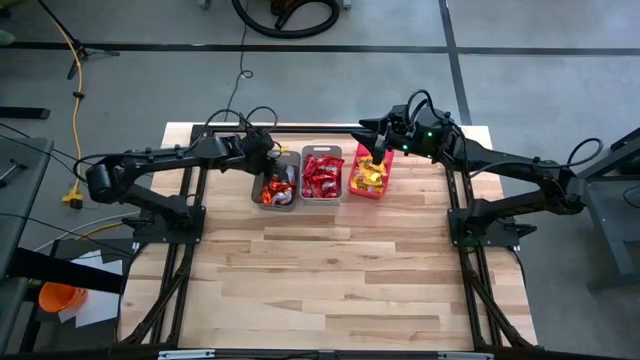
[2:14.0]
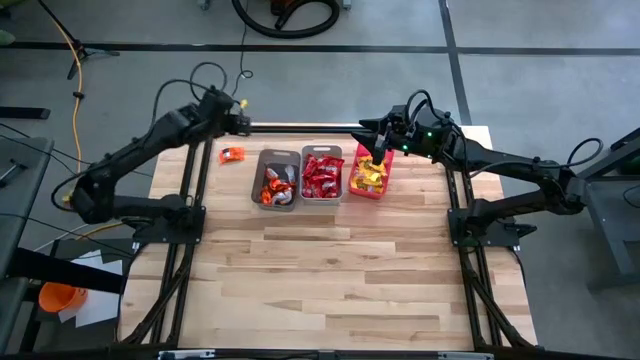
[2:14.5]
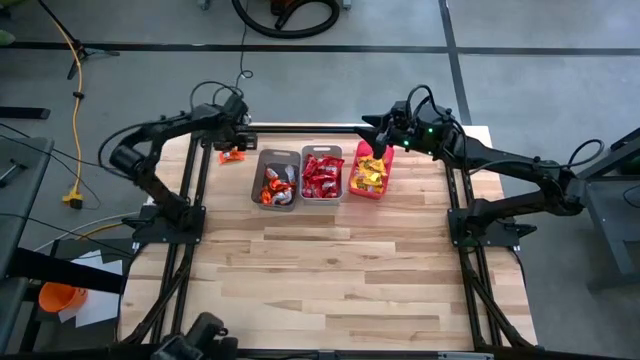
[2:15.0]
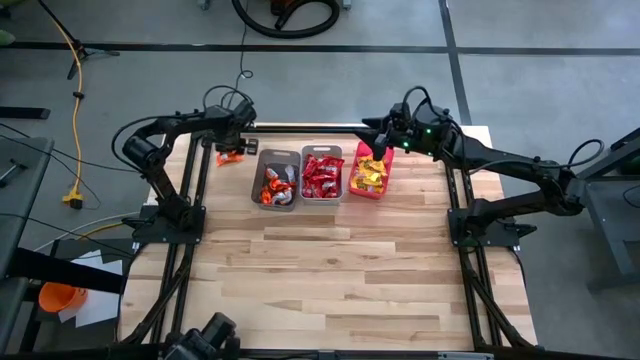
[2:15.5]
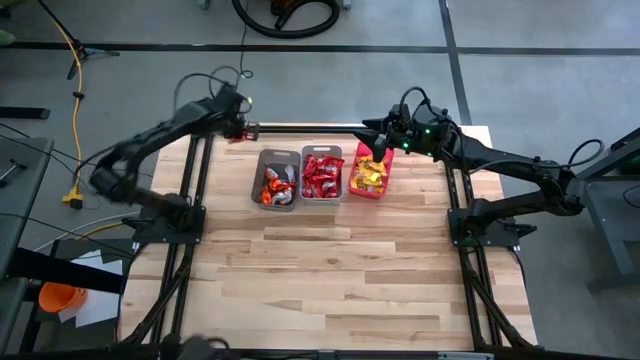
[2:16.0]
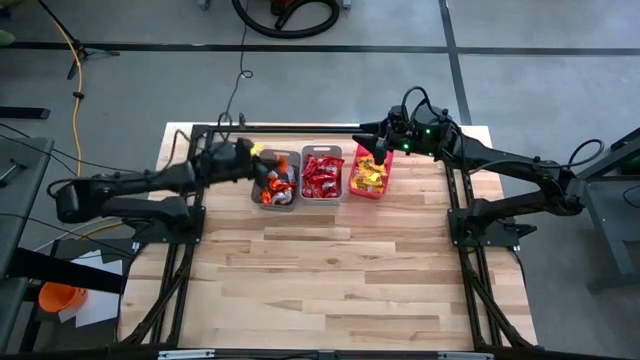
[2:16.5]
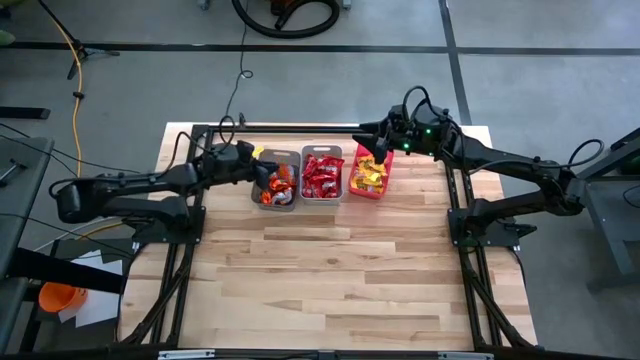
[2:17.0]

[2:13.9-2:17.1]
Task: Sort candy
Put the orange candy into the black bin

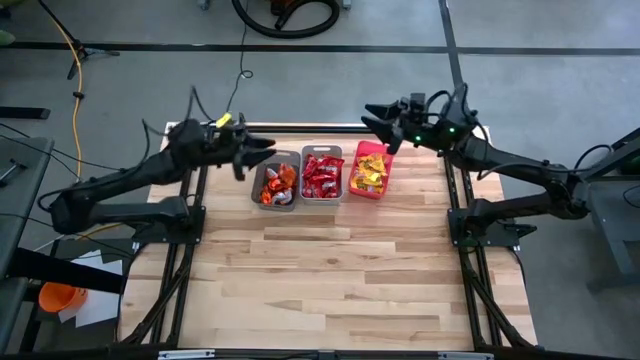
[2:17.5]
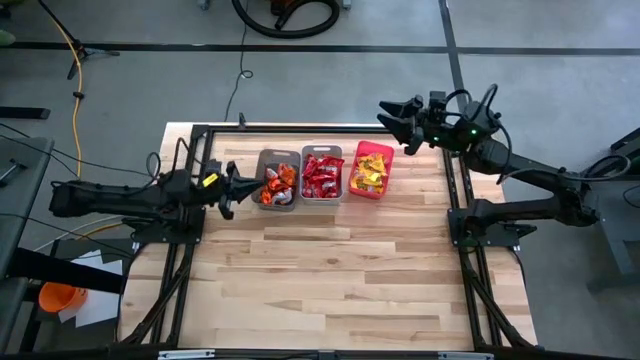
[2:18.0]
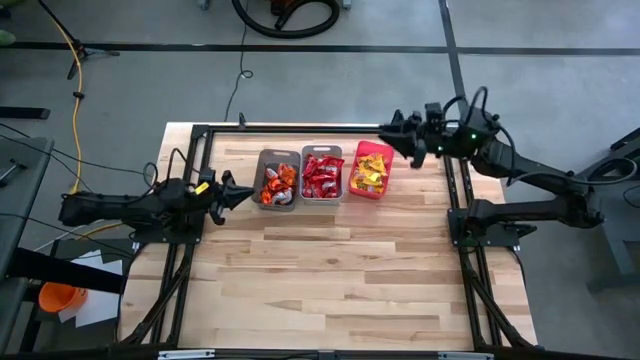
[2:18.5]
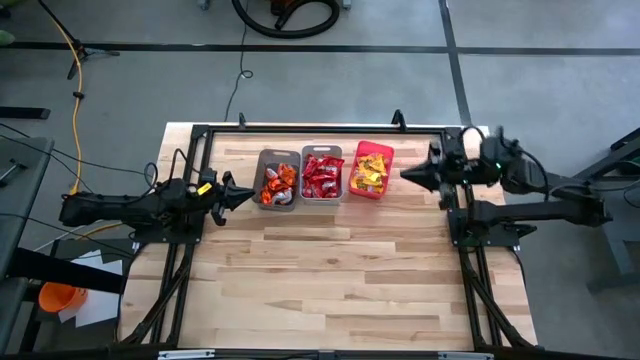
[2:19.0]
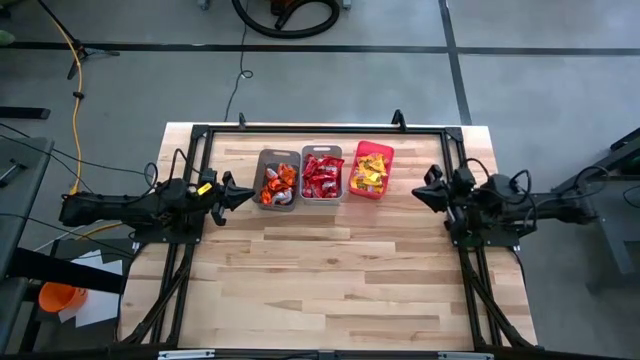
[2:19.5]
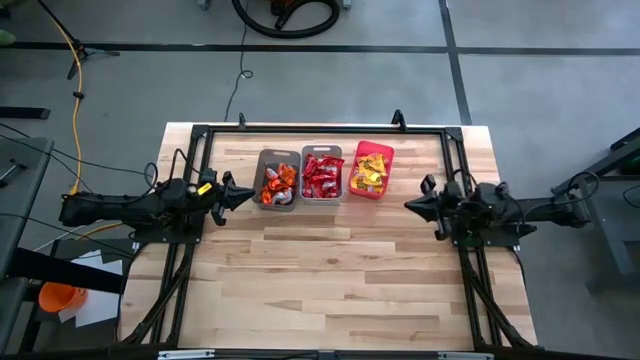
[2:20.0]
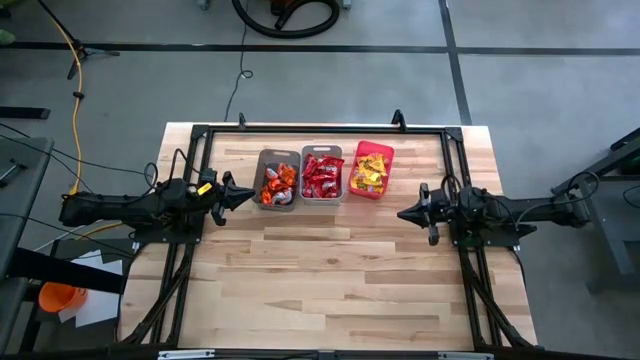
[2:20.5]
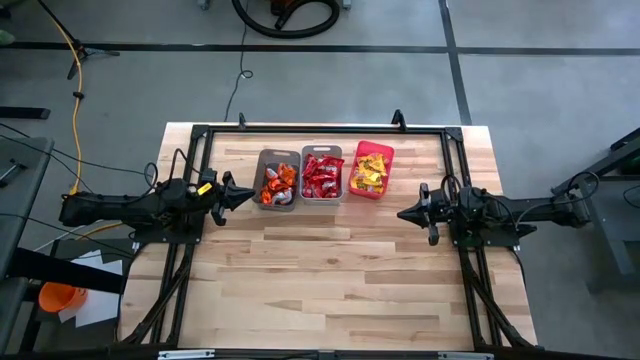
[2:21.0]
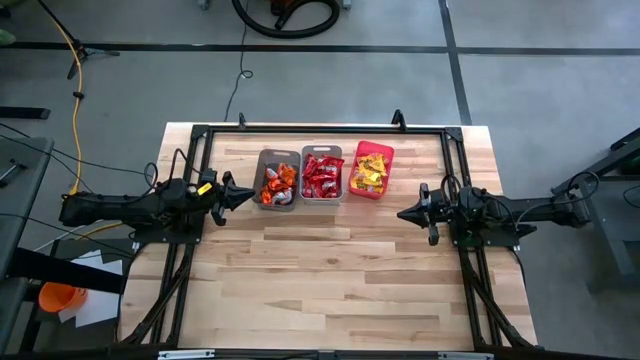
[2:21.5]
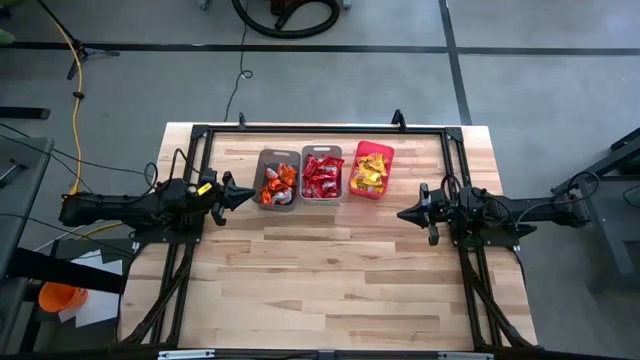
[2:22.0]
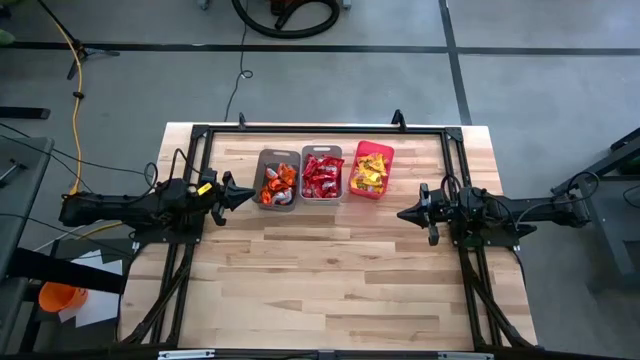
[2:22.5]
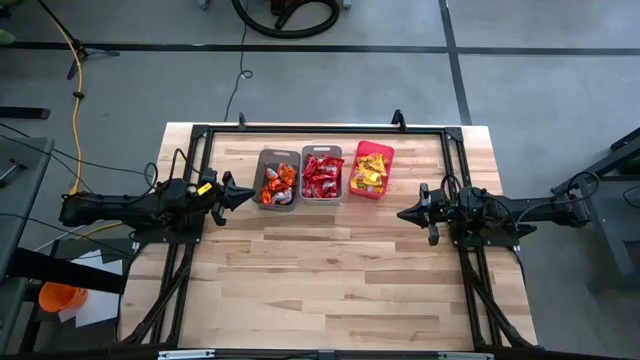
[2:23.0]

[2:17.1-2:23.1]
Return to Home Position

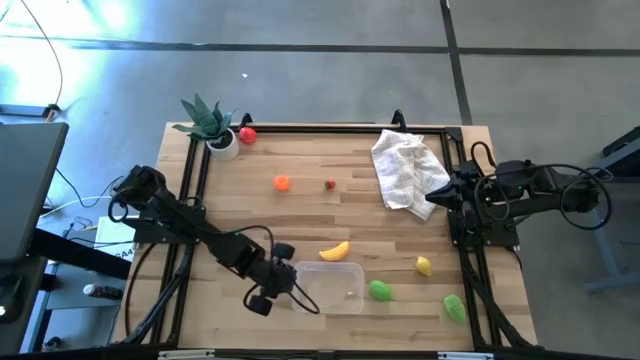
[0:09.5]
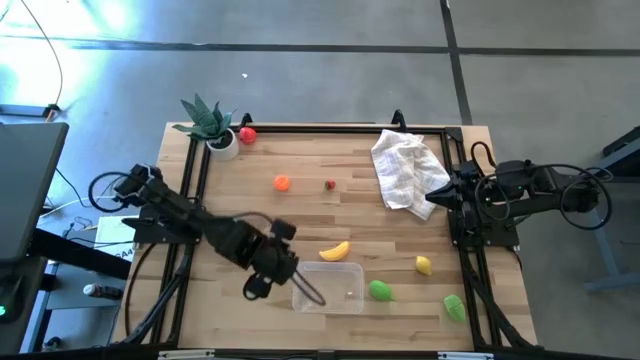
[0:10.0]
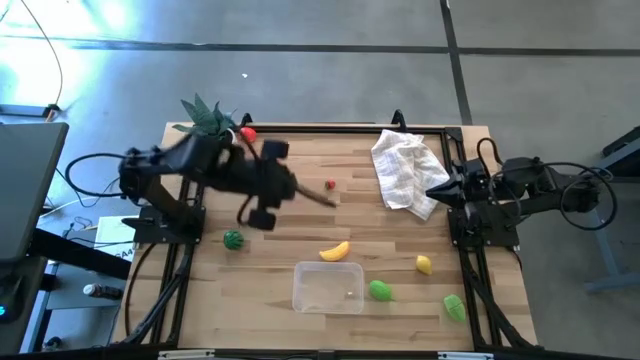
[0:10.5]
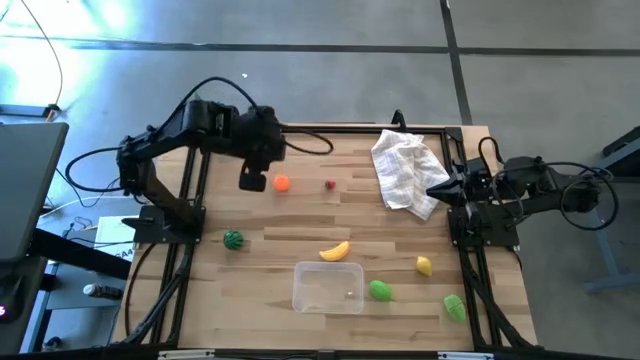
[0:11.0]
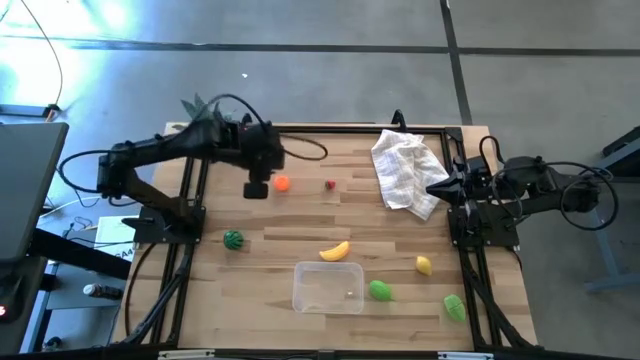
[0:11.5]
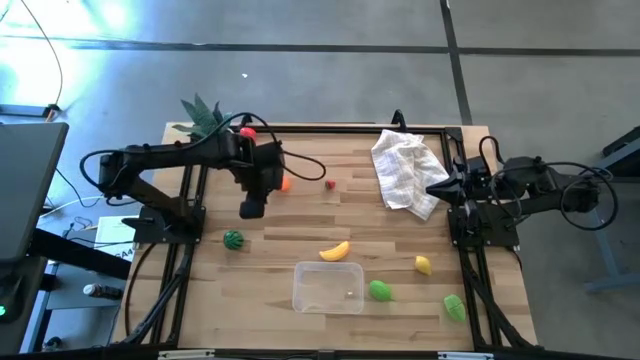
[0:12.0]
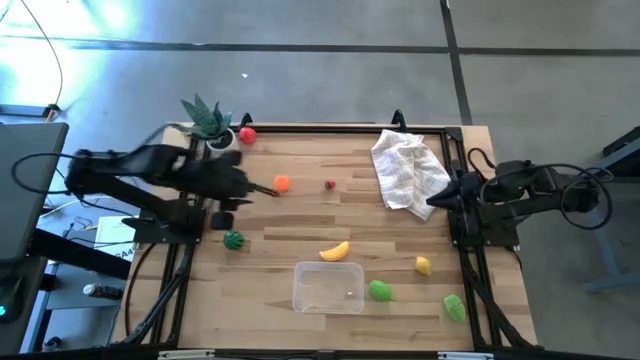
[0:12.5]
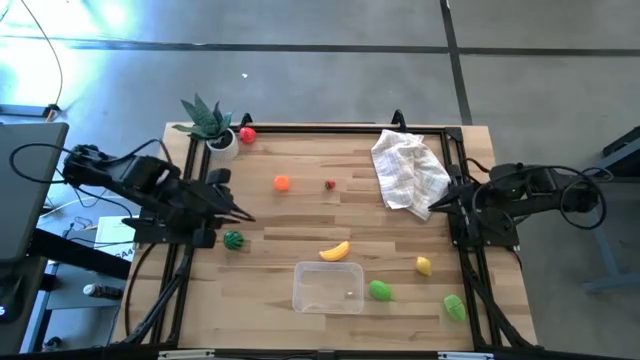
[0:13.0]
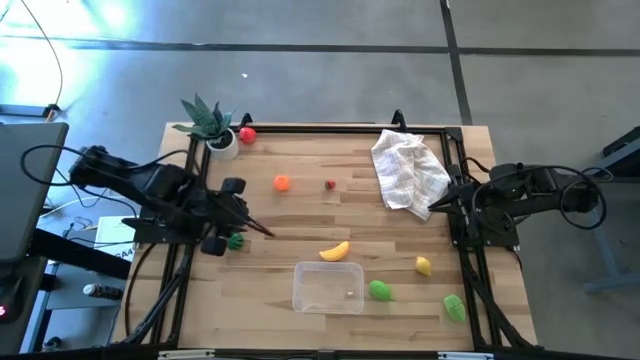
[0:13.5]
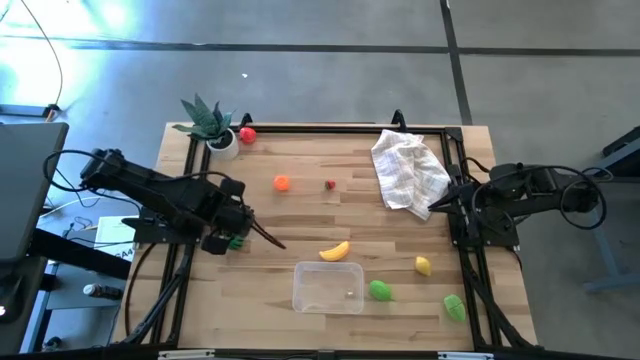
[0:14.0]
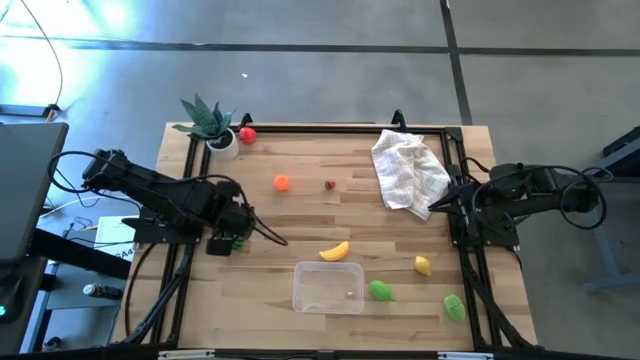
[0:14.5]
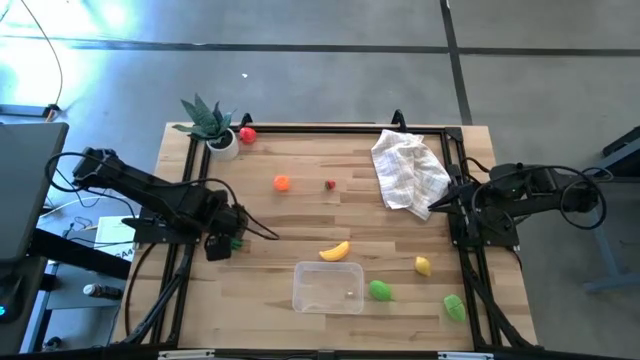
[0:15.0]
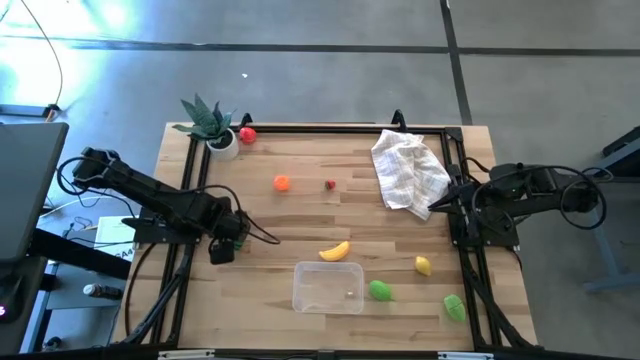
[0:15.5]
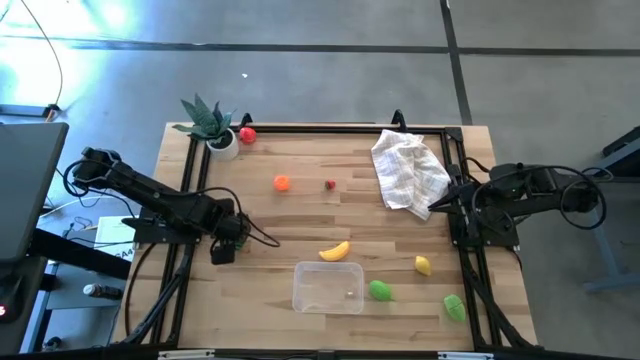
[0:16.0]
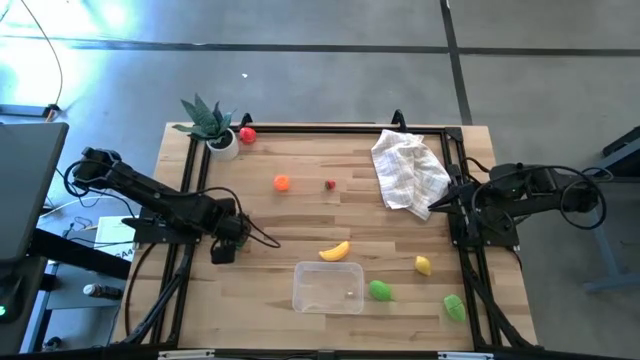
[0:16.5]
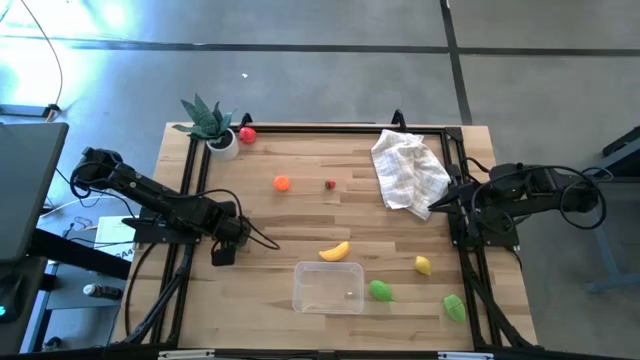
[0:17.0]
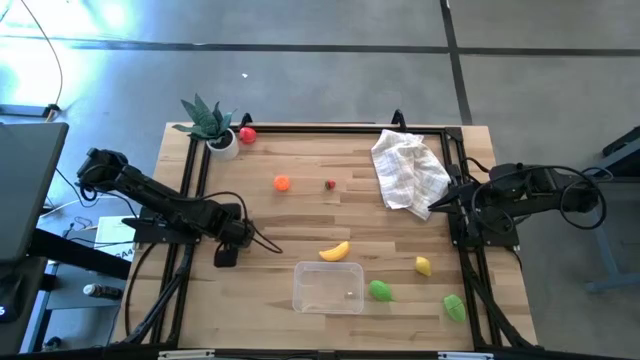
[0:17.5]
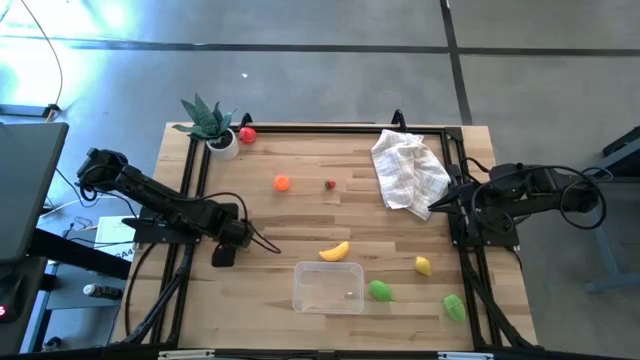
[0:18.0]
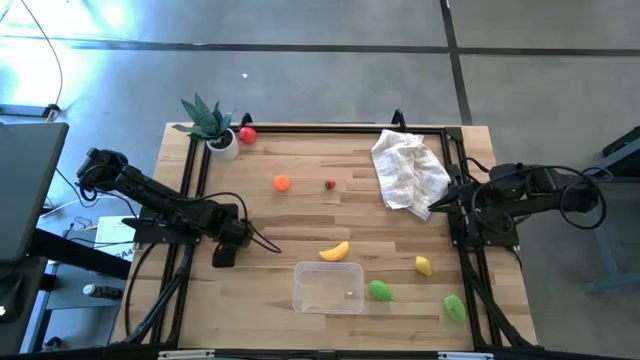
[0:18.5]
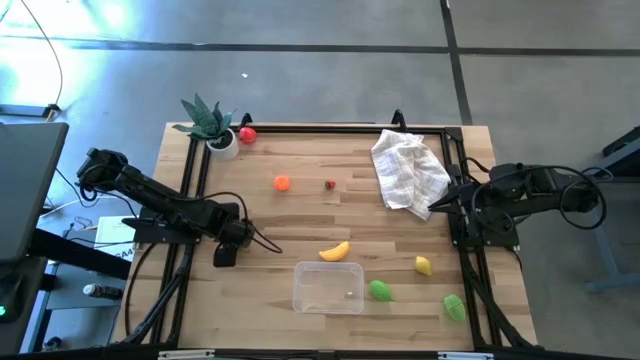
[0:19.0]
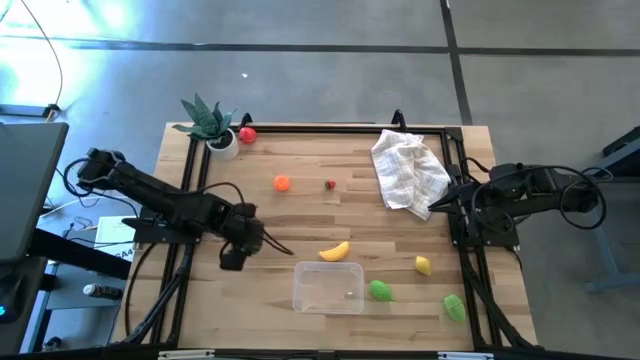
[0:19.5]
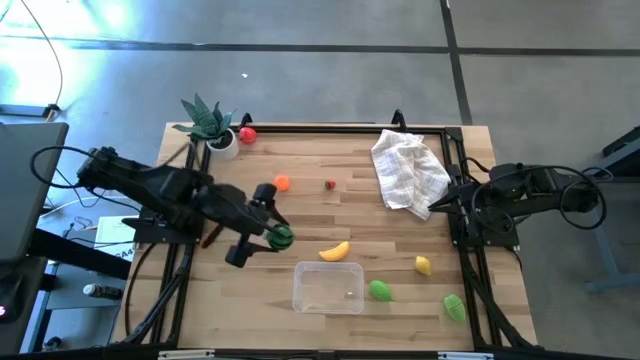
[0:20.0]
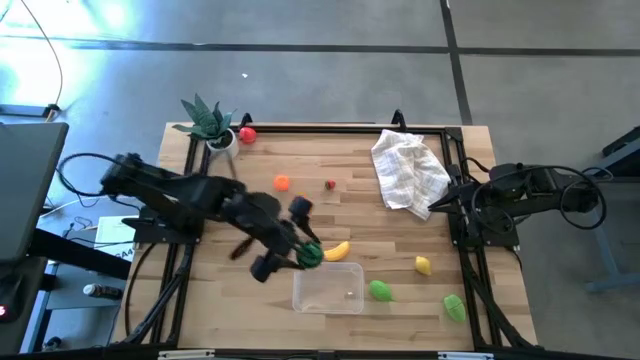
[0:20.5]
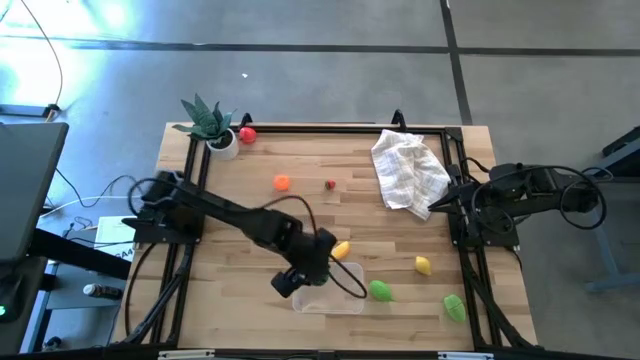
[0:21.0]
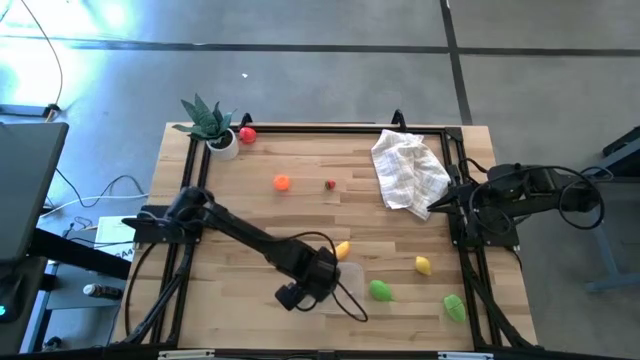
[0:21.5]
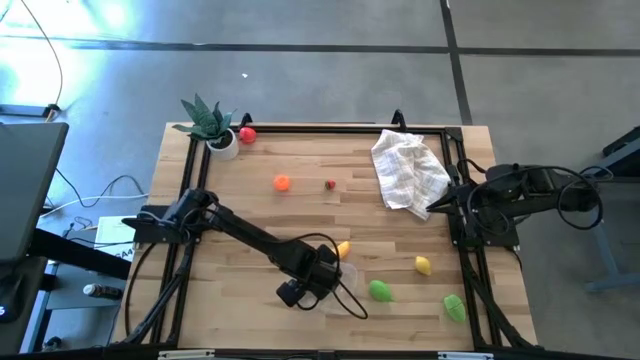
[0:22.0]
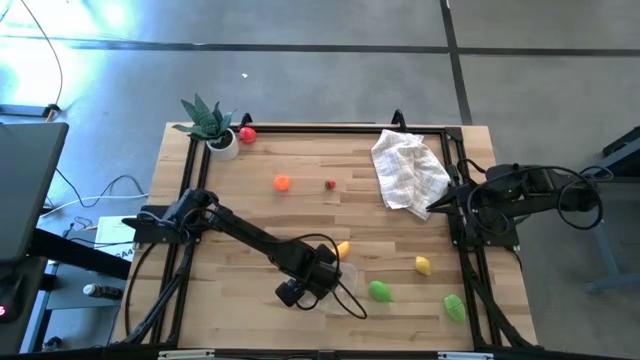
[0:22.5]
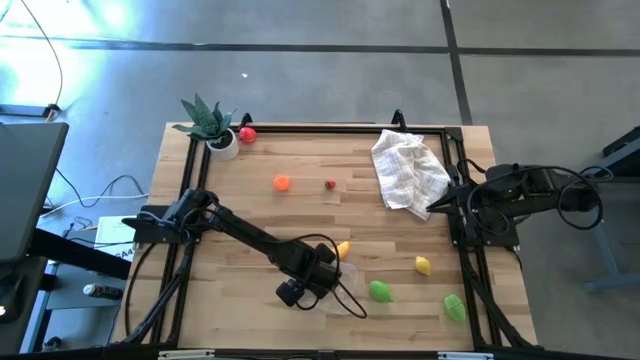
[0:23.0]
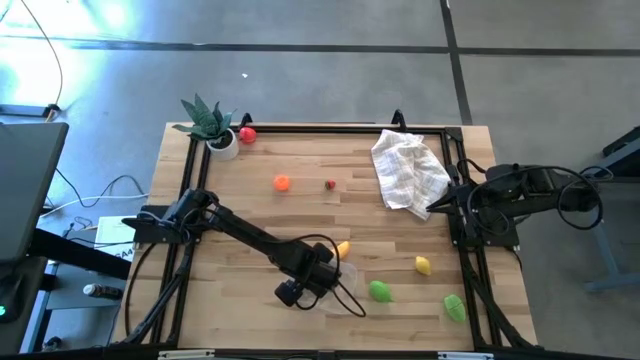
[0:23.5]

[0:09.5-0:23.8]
Task: Pick and placing Produce into tupperware
Put the watermelon into the bin
